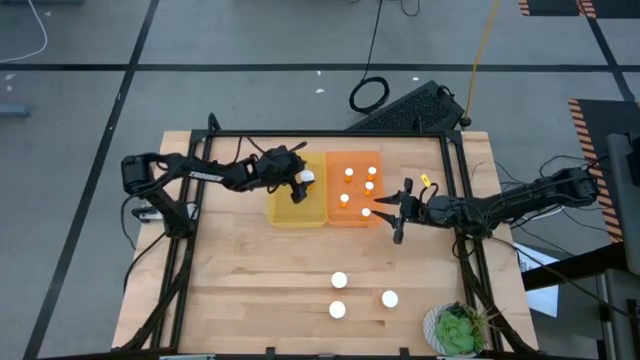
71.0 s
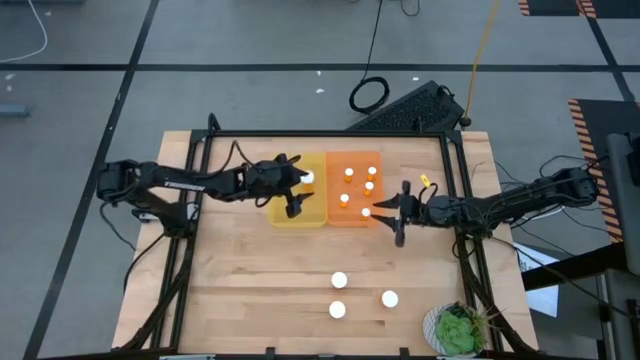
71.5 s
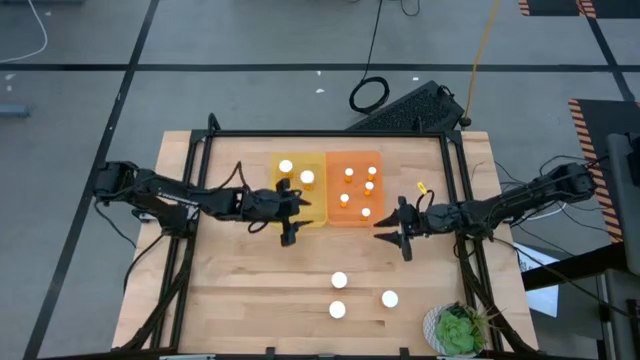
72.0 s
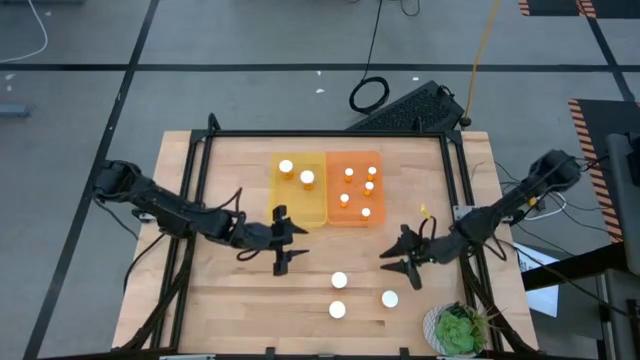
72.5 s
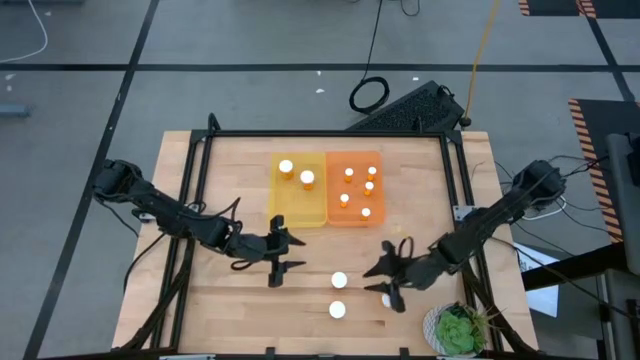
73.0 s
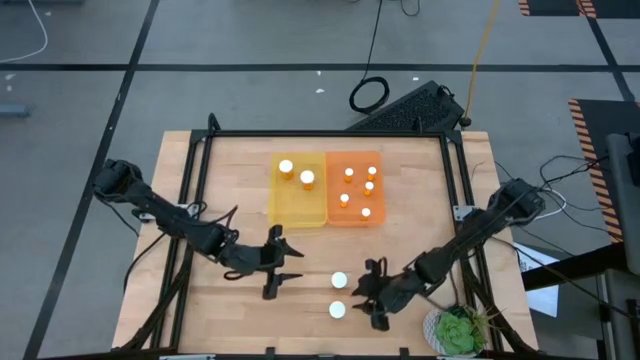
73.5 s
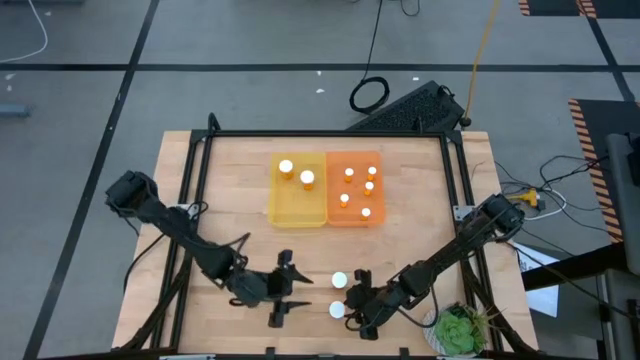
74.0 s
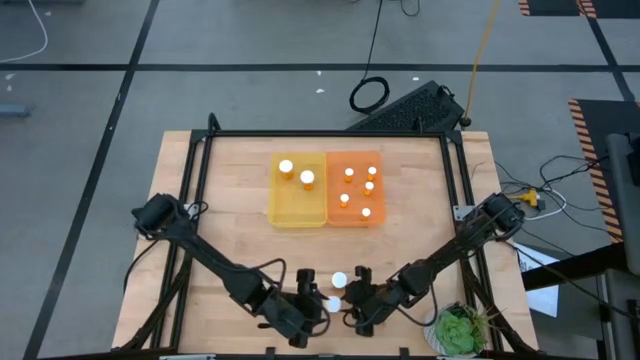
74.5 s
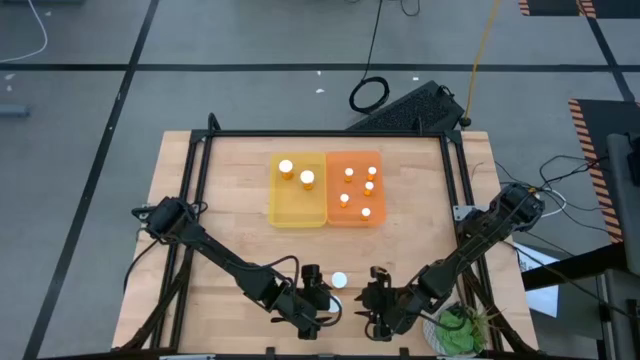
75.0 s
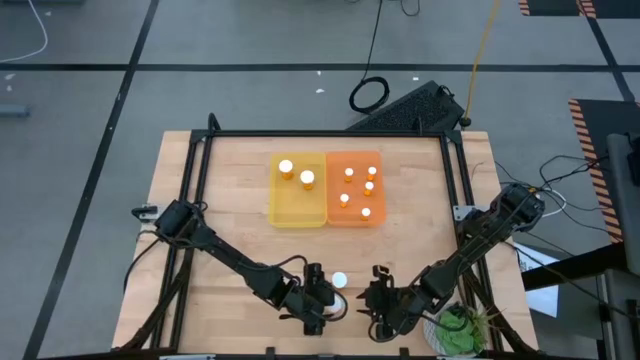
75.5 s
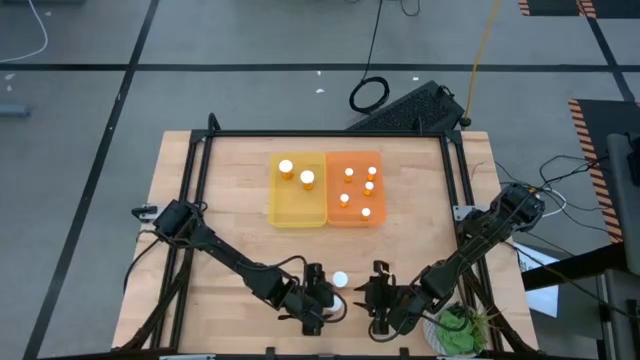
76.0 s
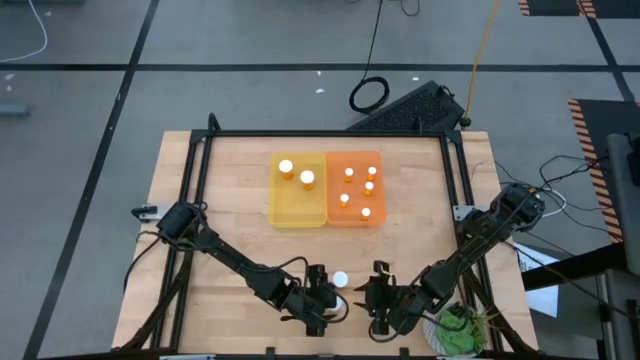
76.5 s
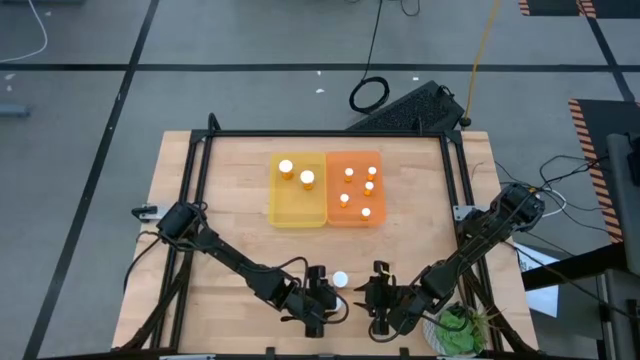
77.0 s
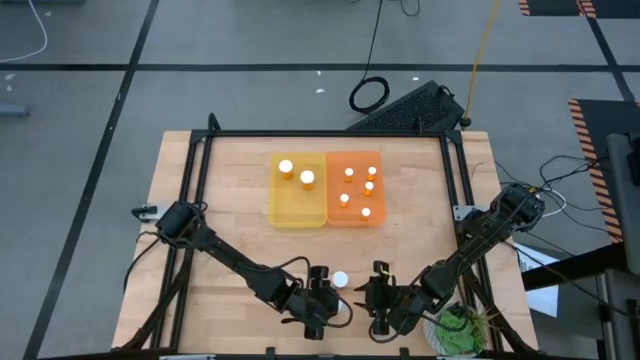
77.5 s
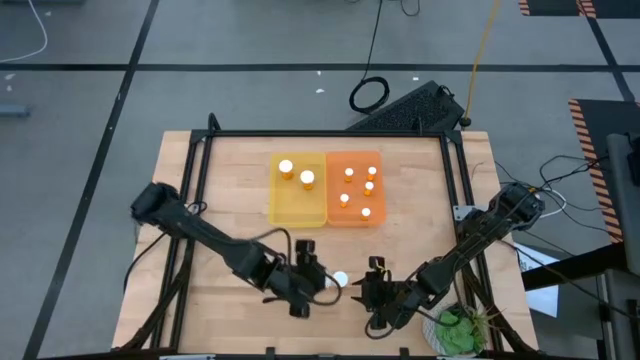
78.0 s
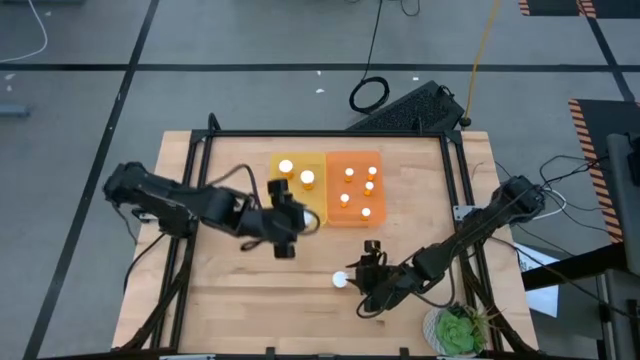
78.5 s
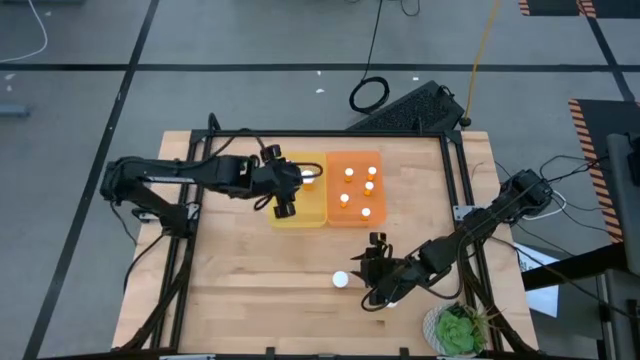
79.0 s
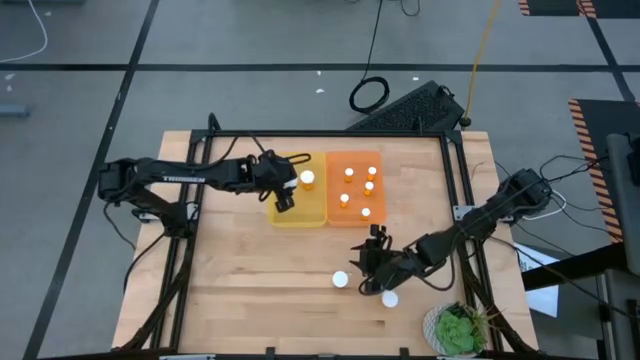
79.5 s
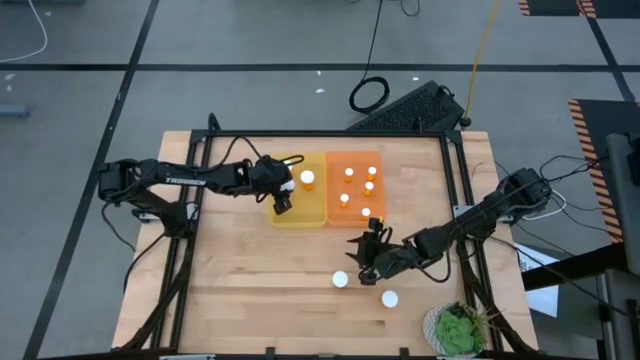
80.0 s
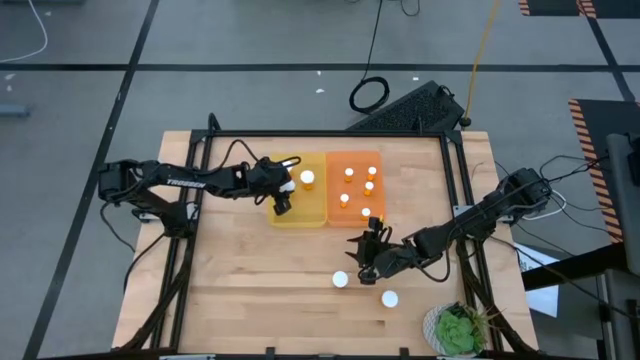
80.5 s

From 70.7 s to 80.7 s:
Task: Pick and place medicine bottles into bin by pill shape (circle, oval)
Put the large orange pill bottle into the yellow bin

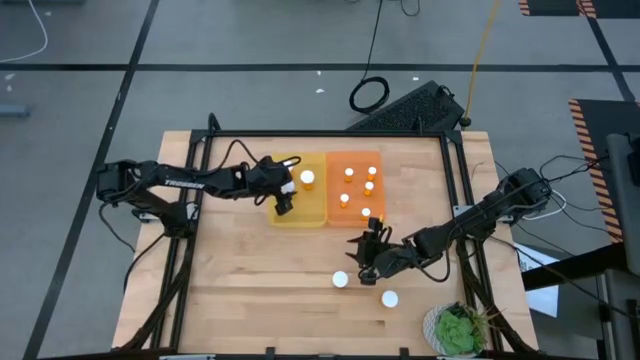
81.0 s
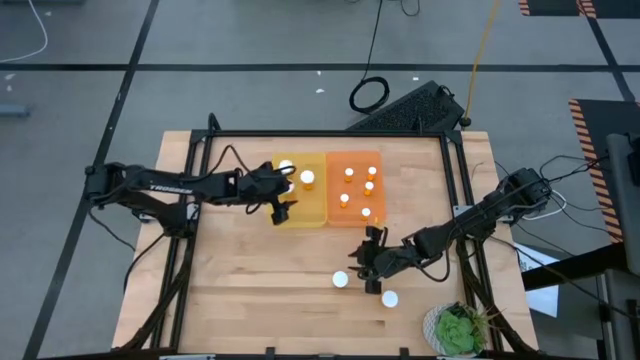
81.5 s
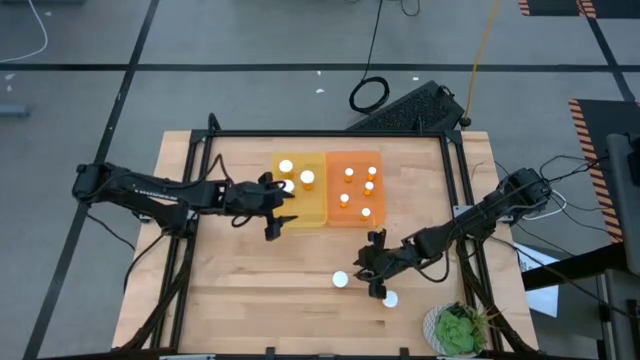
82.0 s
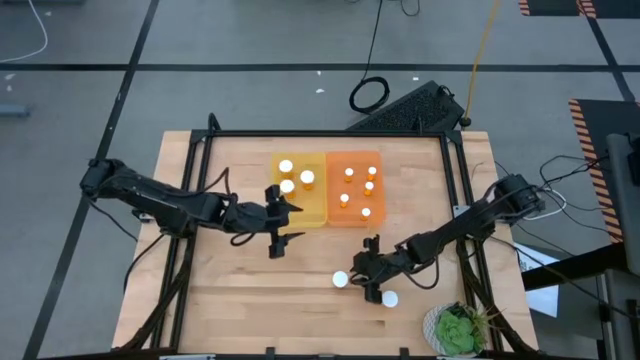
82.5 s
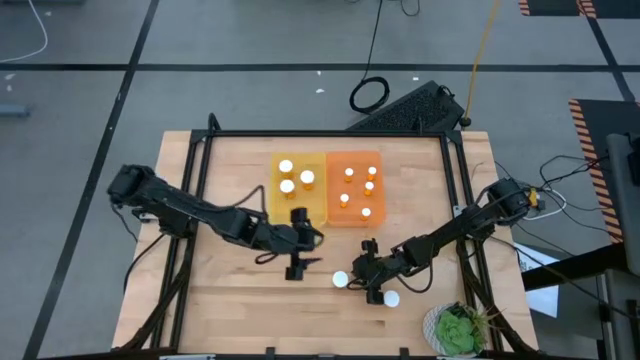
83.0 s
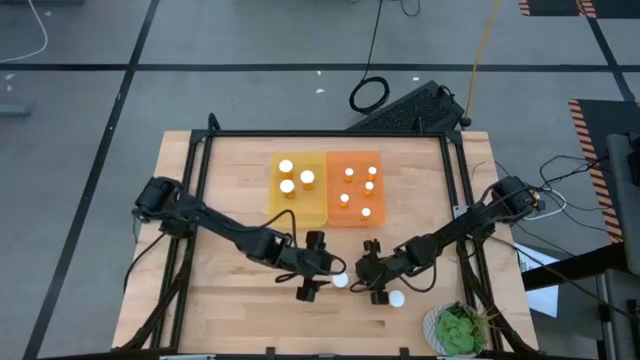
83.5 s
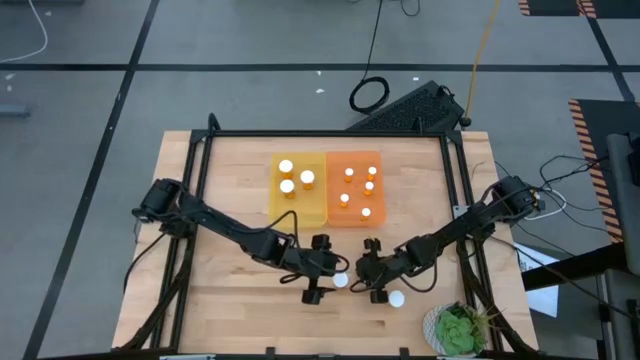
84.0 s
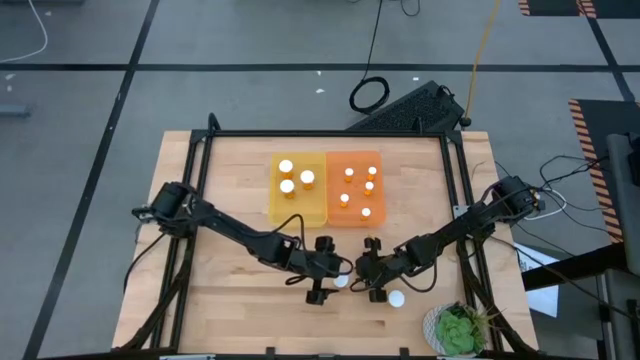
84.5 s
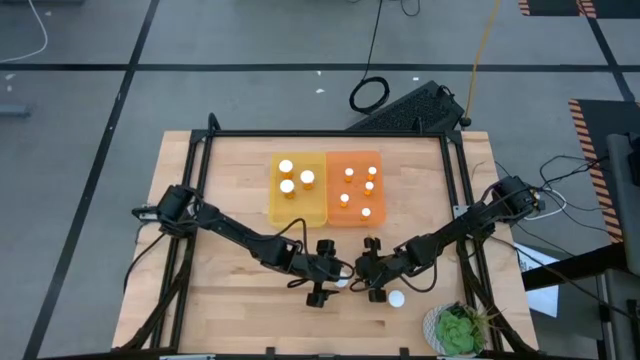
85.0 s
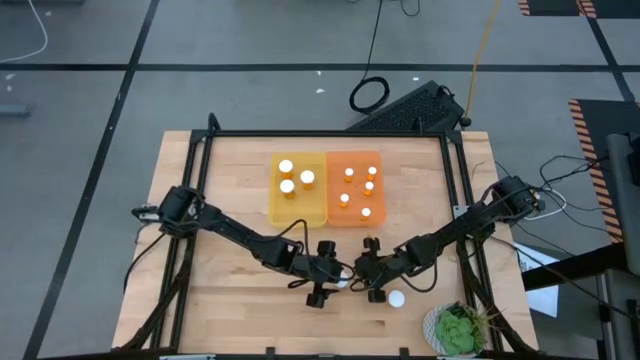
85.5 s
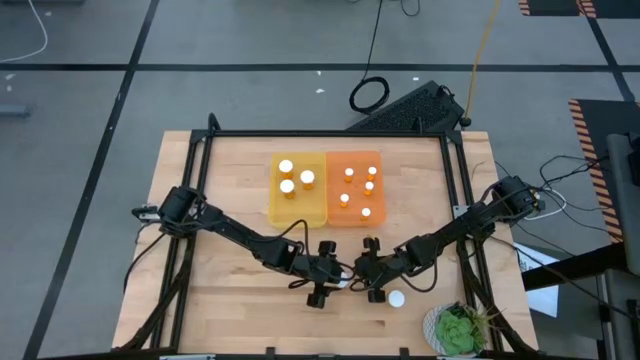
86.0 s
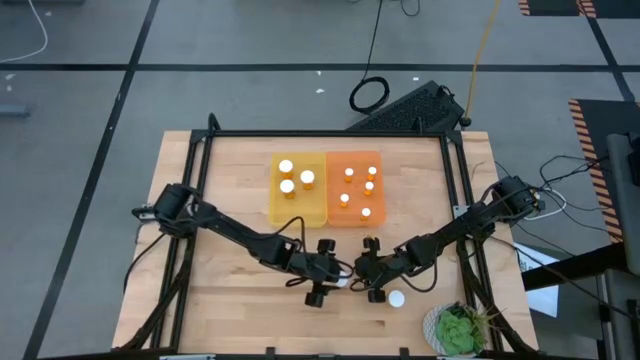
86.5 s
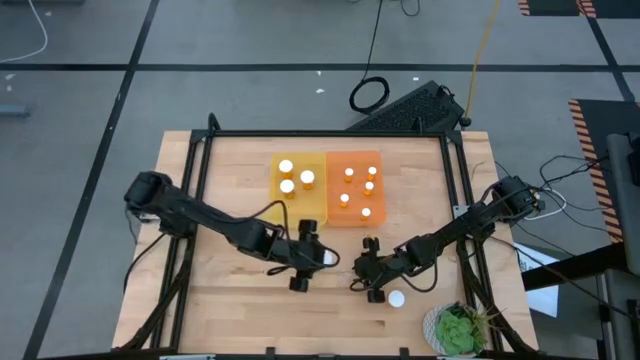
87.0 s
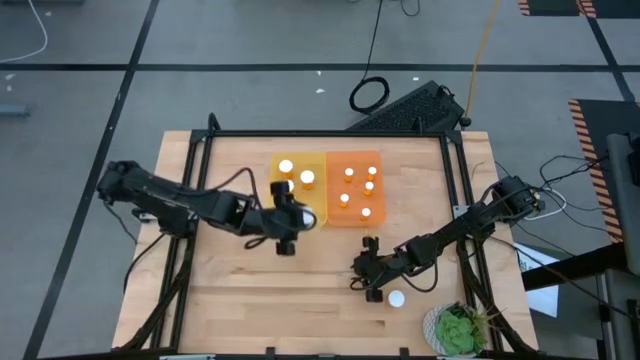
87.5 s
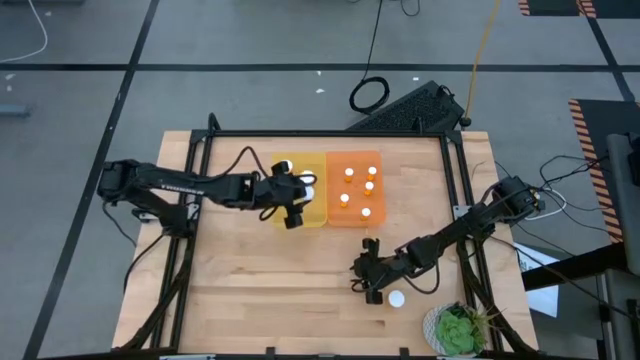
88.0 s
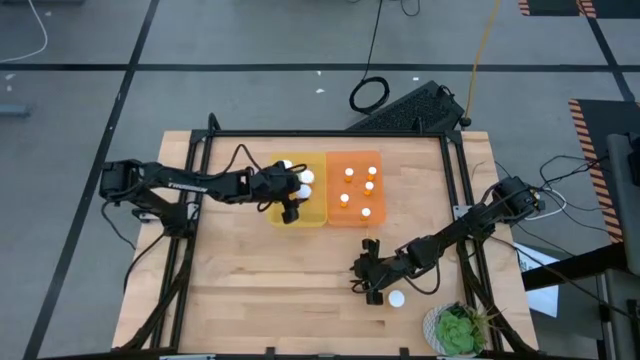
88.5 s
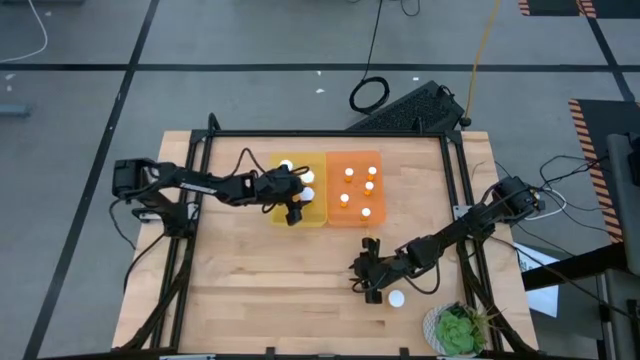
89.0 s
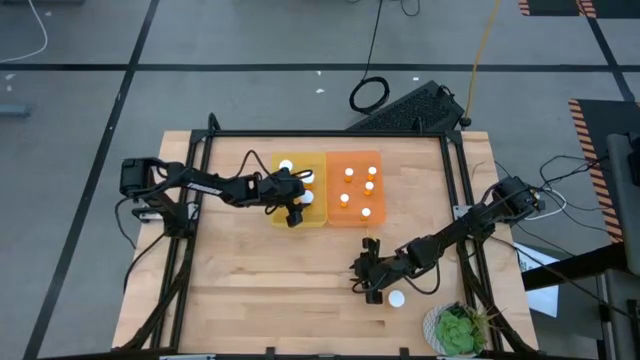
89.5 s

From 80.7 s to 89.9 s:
Put the large orange pill bottle into the yellow bin

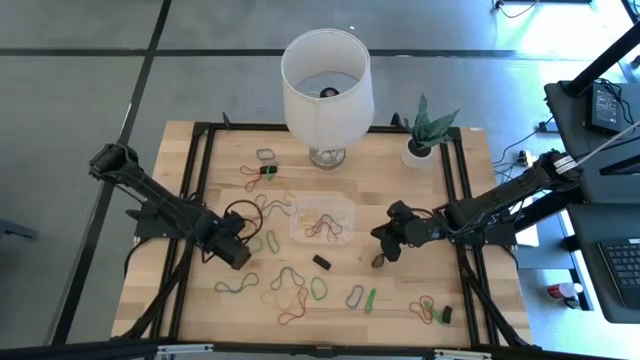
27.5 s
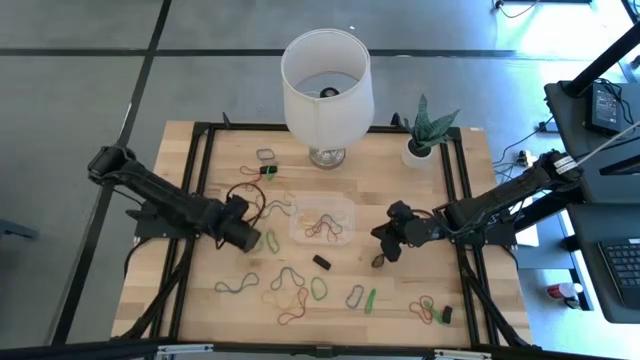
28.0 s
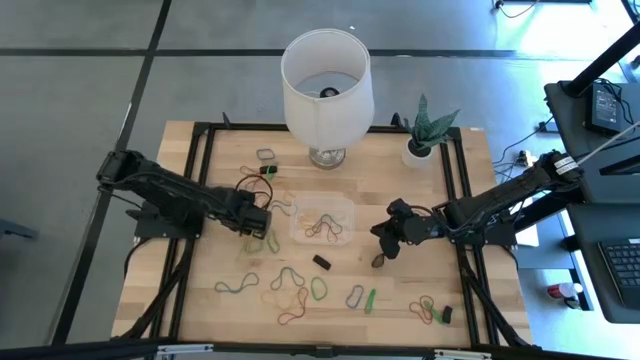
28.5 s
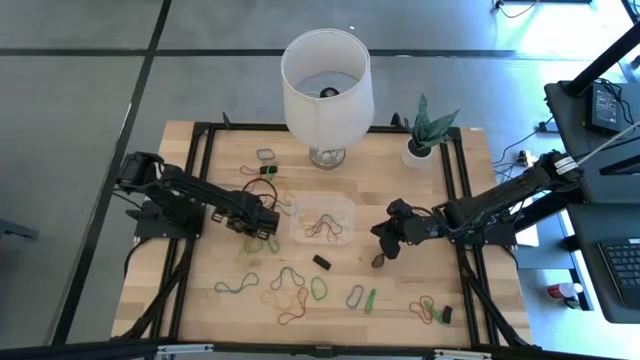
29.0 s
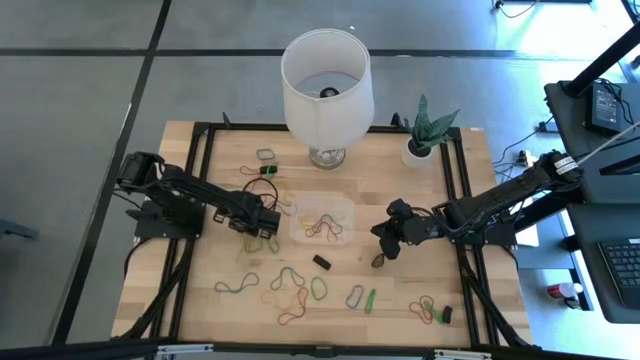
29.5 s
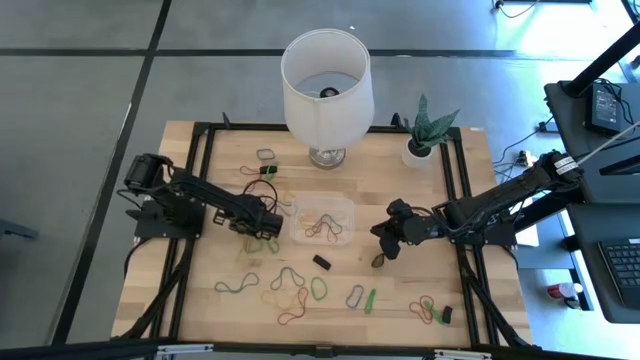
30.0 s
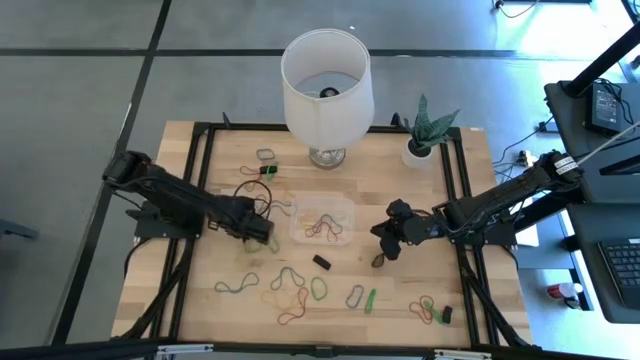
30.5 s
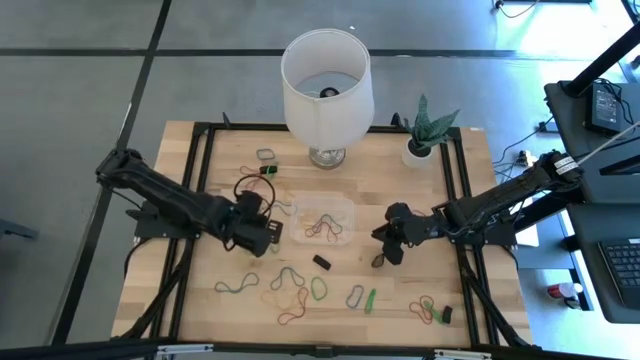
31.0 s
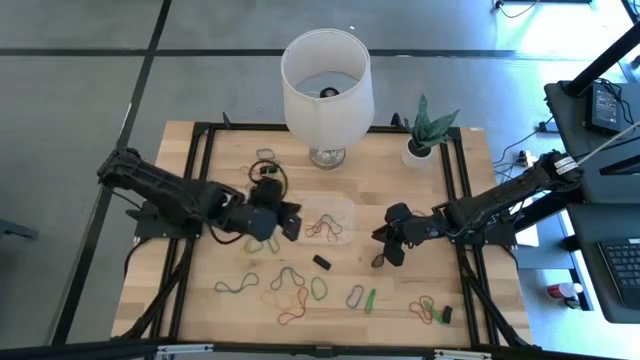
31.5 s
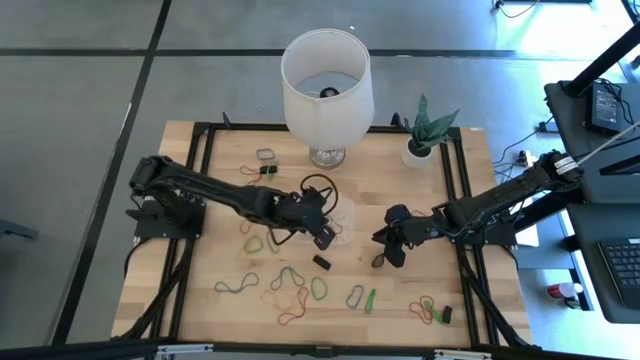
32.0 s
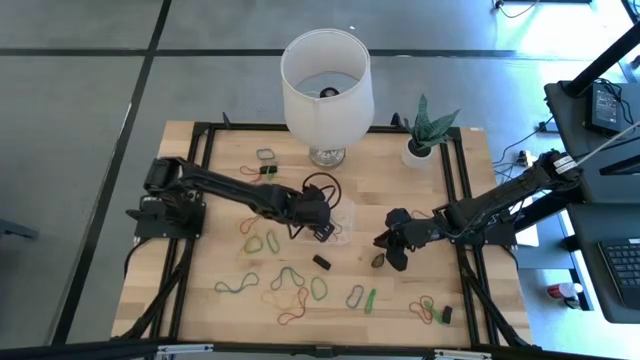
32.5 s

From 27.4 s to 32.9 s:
Task: Pick and place rubber bands into bin
Put the yellow rubber band into the container
